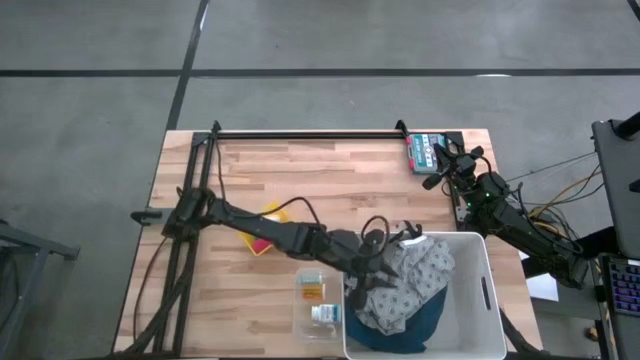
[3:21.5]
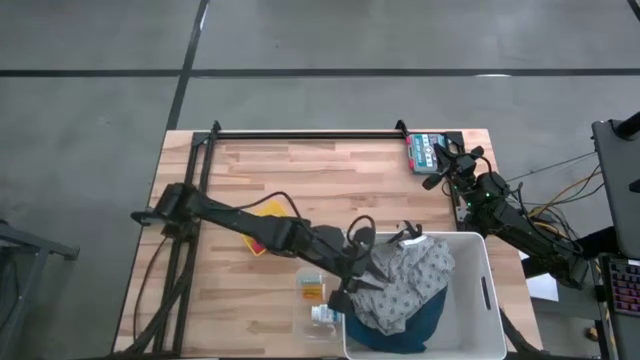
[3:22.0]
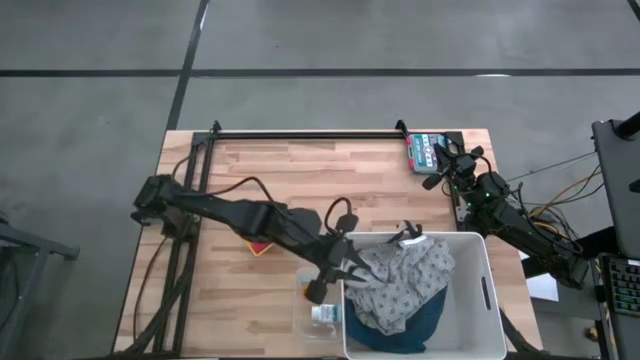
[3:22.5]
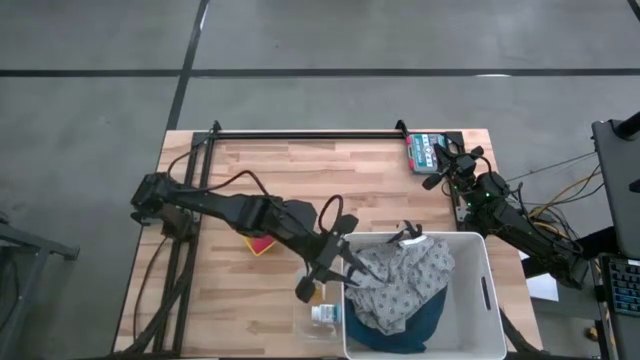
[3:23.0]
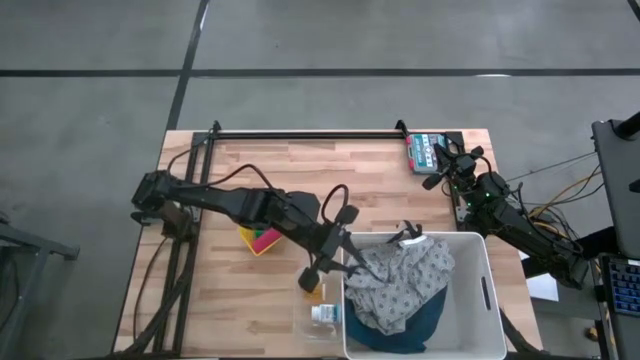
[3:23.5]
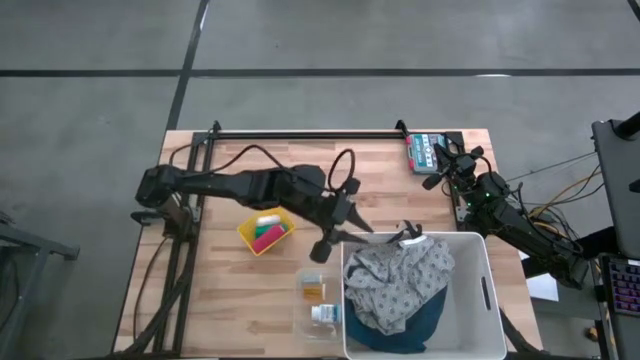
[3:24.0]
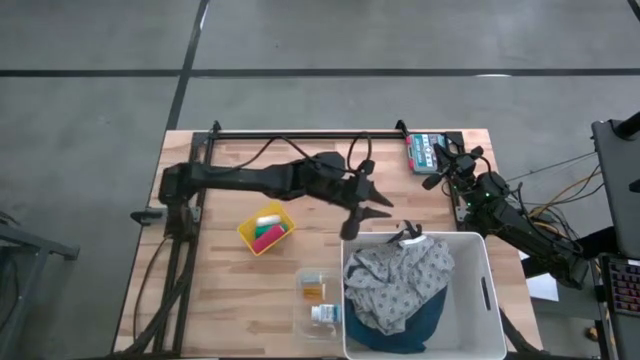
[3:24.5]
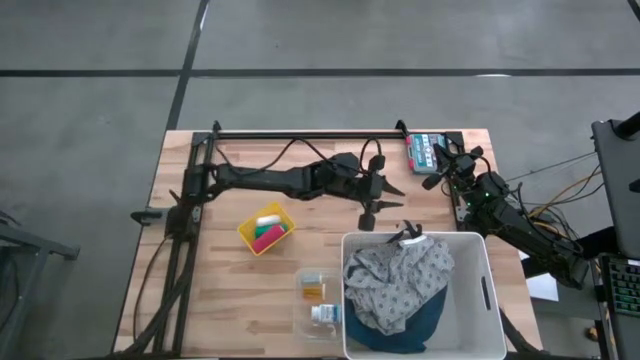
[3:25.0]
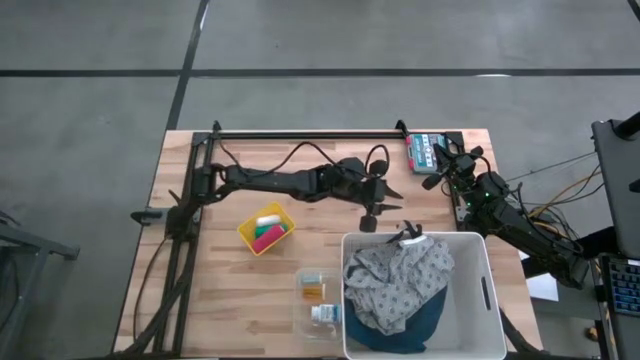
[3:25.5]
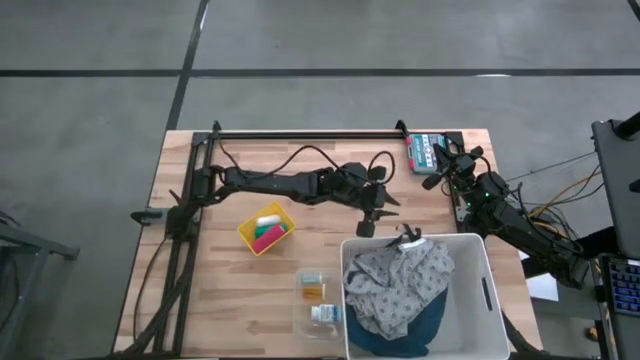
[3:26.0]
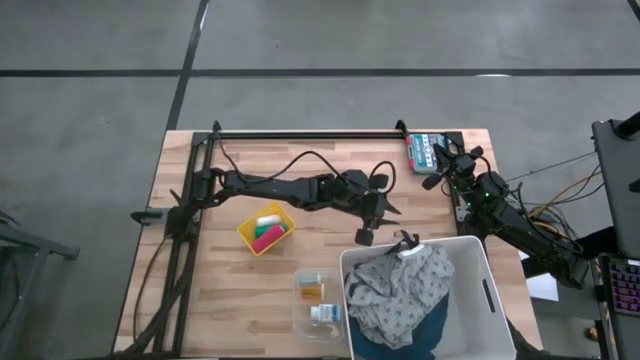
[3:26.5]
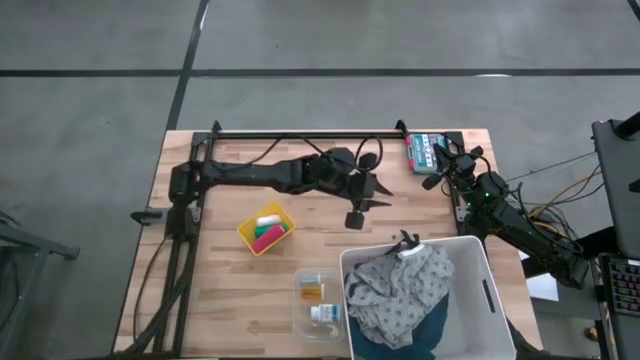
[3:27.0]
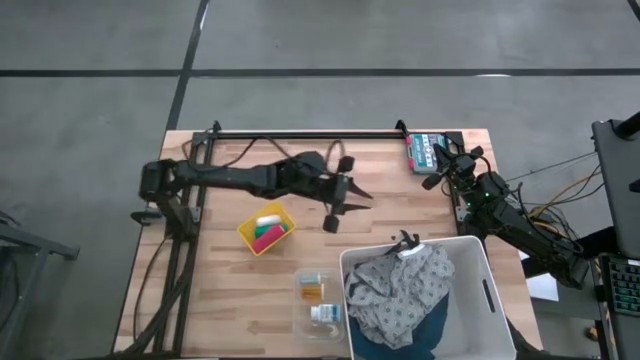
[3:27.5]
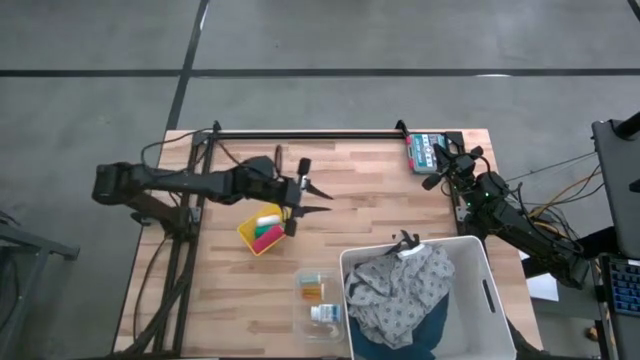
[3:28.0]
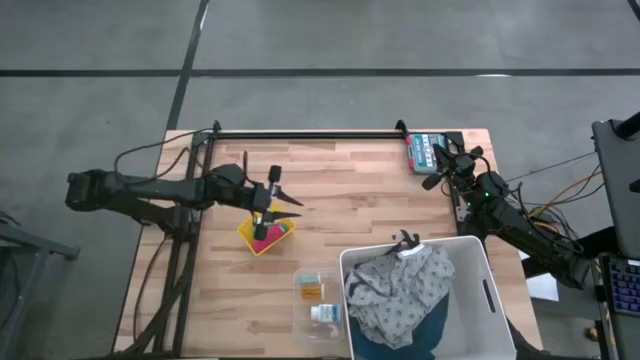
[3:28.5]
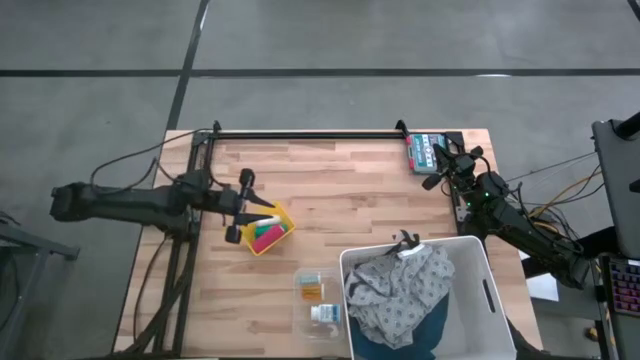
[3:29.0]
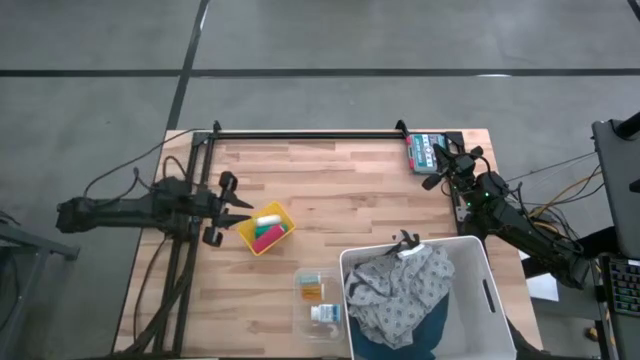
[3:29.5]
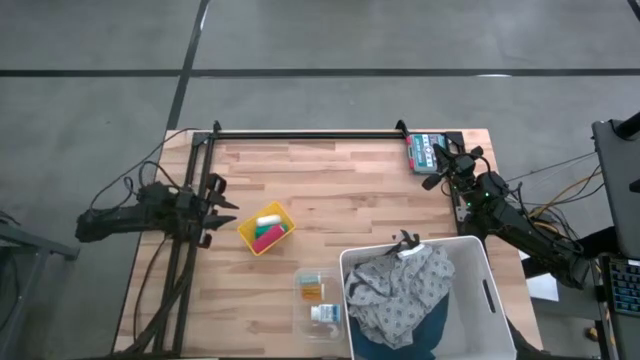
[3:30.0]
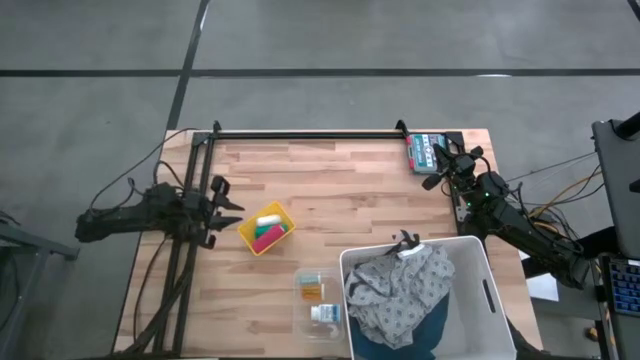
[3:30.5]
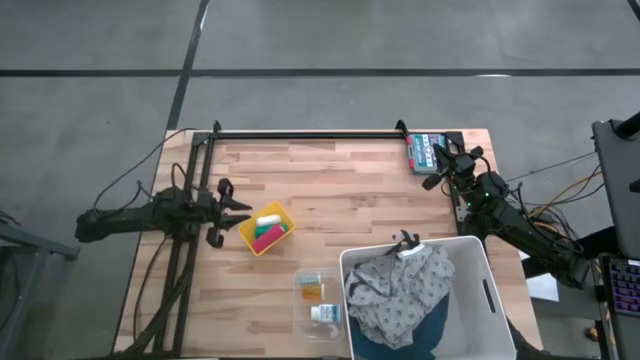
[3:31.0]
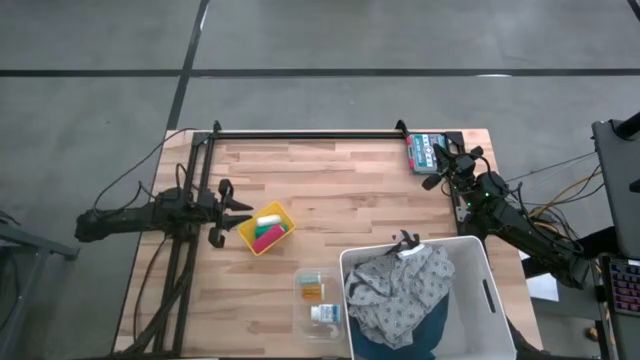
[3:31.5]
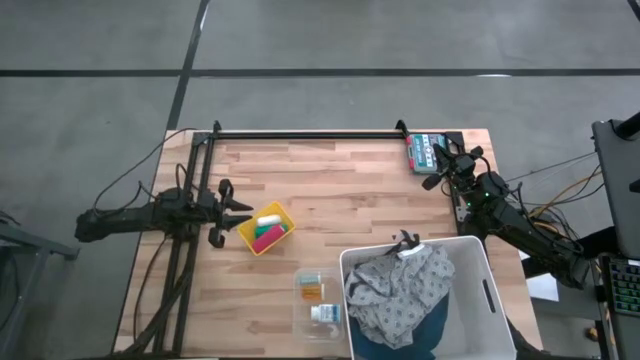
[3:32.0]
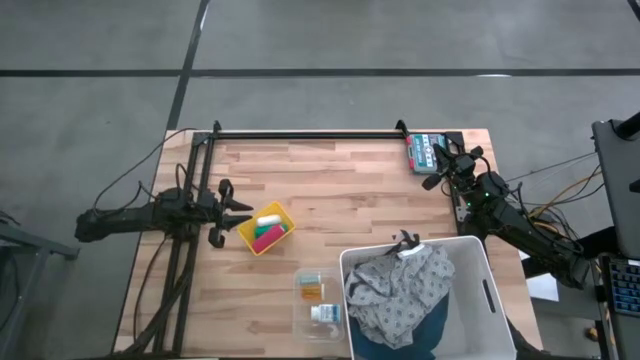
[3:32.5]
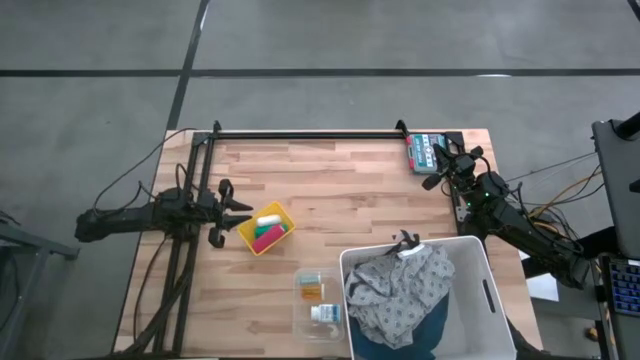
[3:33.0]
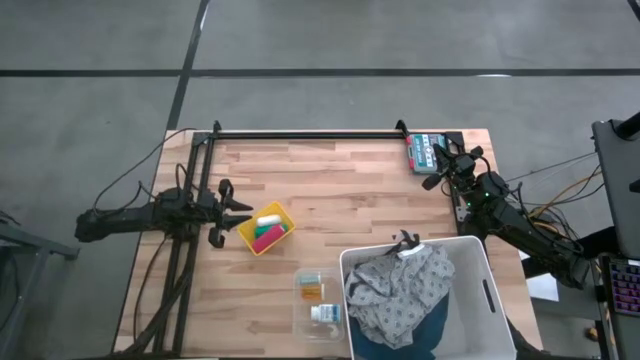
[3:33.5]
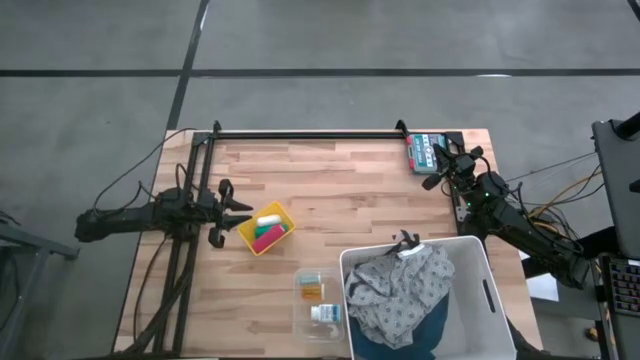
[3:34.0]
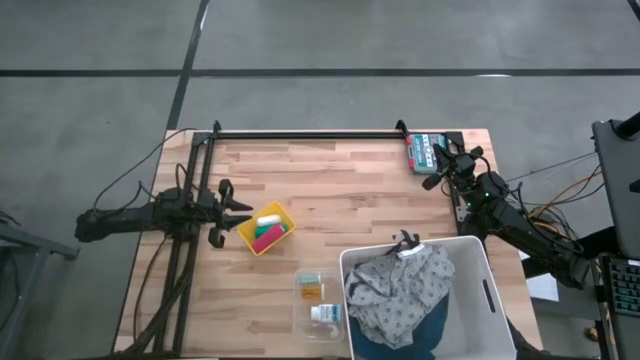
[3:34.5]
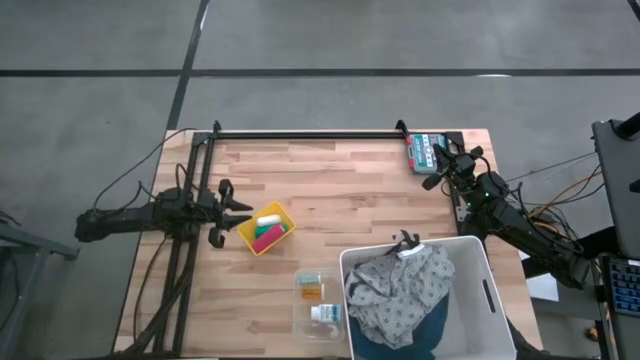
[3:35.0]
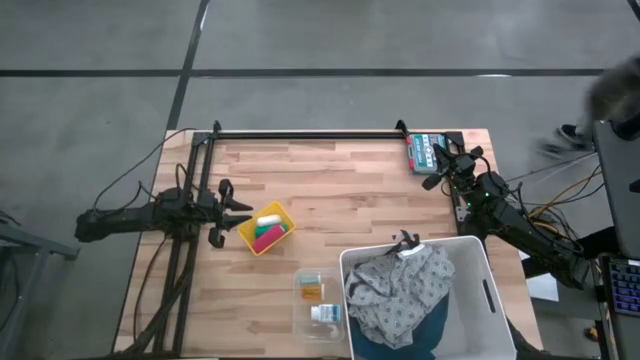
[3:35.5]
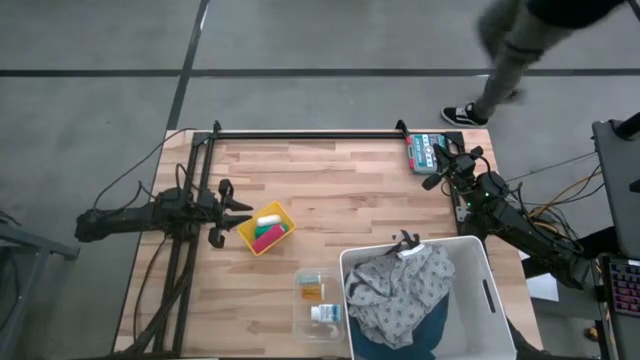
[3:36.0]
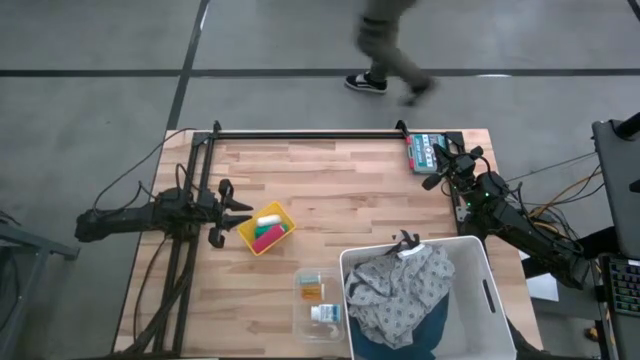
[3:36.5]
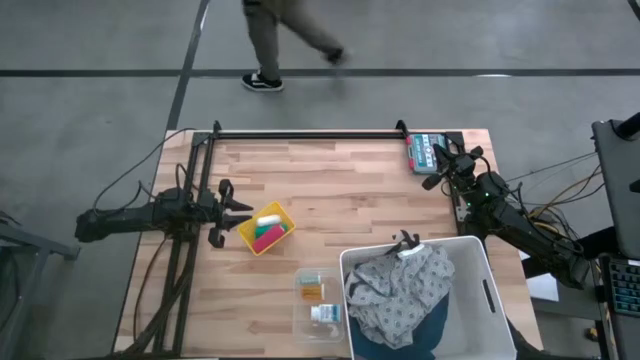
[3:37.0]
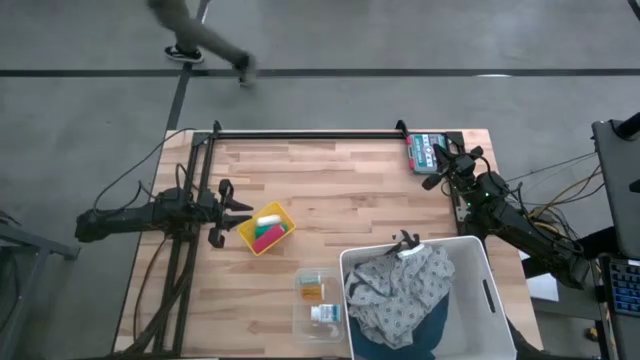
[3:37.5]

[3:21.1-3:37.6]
Task: Pick & Place Medicine items
Return to Home Position

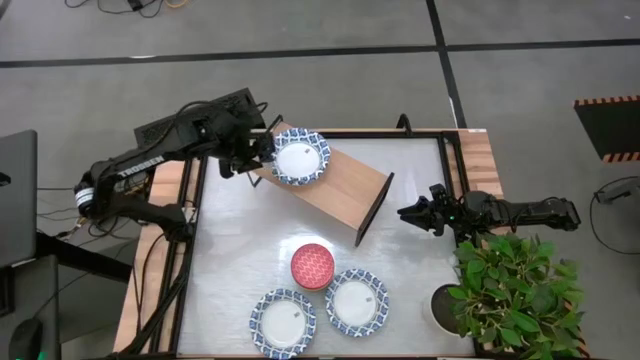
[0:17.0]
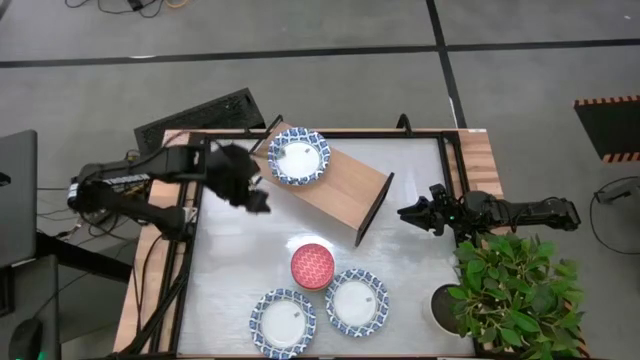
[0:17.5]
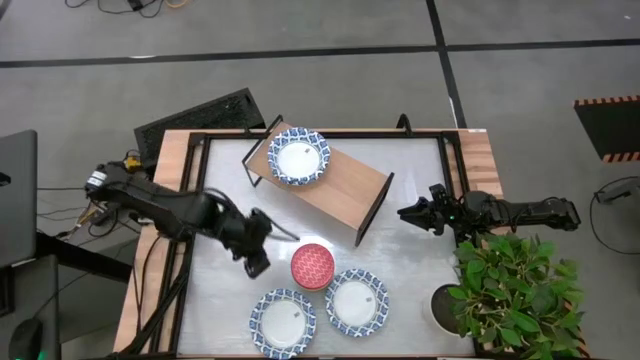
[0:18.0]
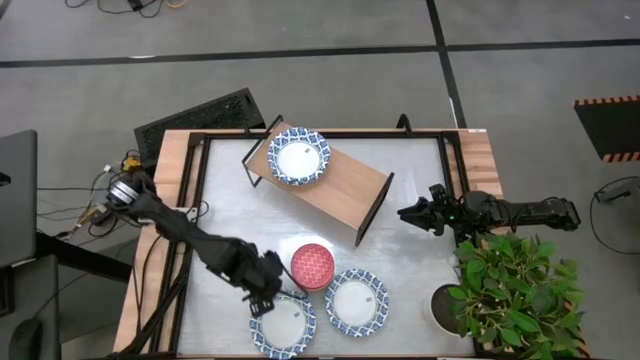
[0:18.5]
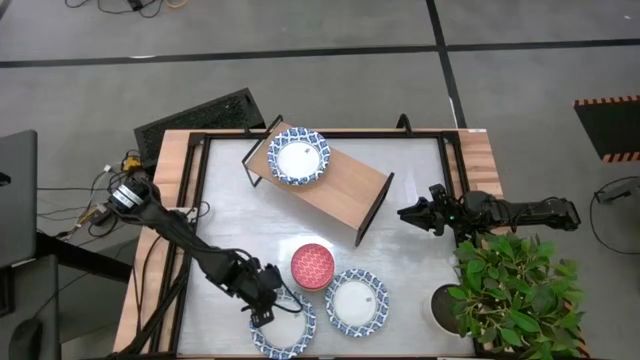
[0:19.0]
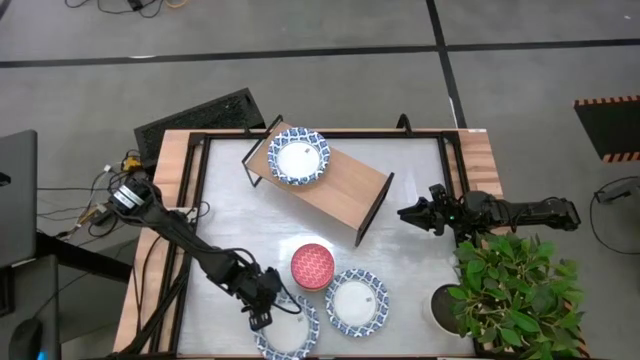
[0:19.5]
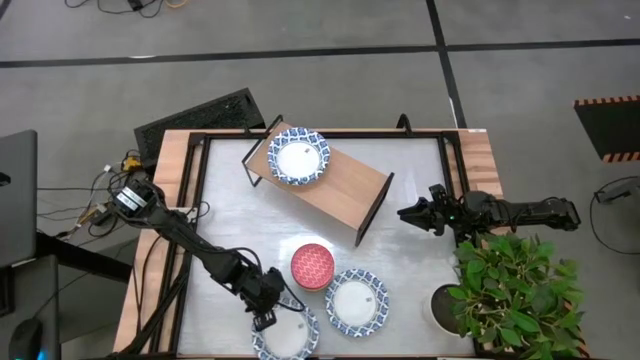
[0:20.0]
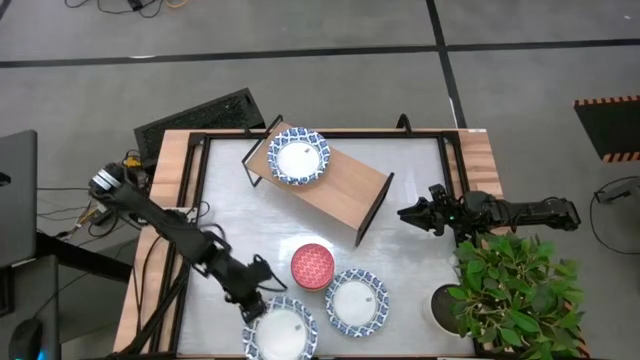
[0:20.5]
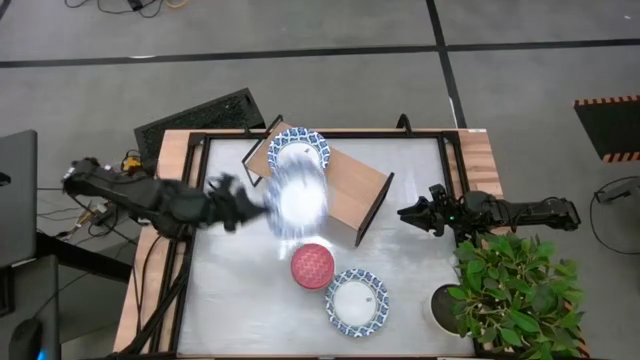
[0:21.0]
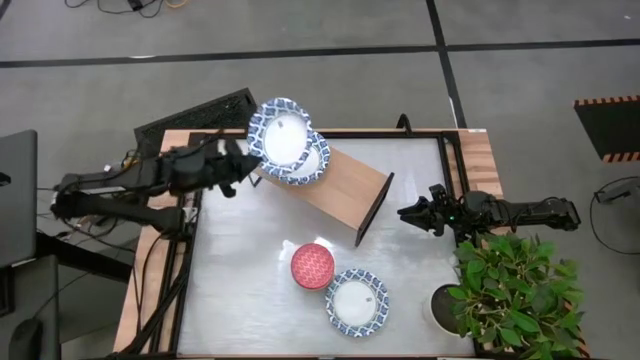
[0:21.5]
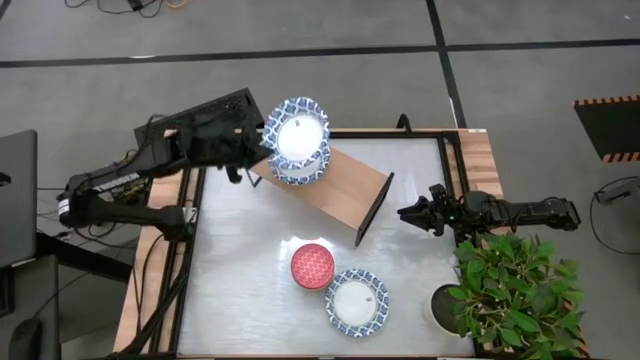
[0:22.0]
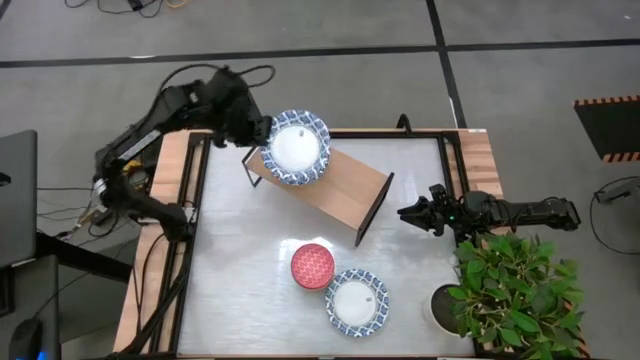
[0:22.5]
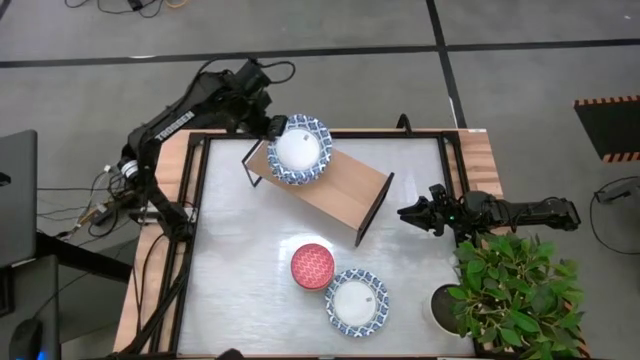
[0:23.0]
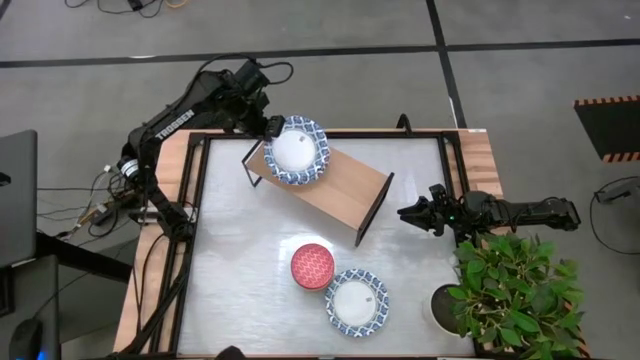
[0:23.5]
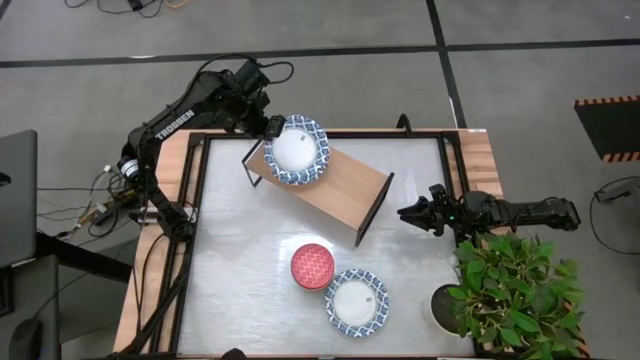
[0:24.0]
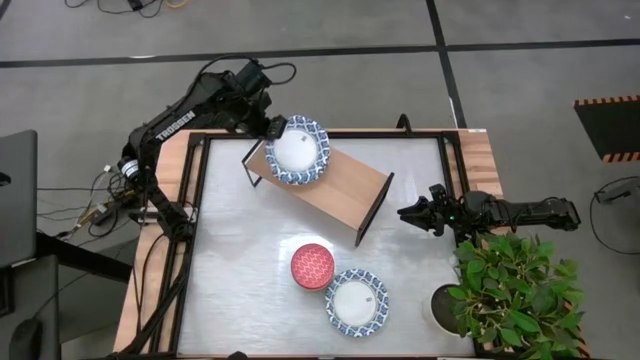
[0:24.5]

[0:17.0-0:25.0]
Task: Place and stack bowls onto a shelf
Stack the left white bowl on top of the white bowl on the shelf
